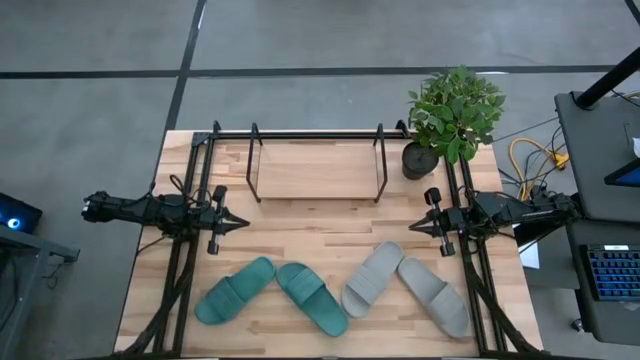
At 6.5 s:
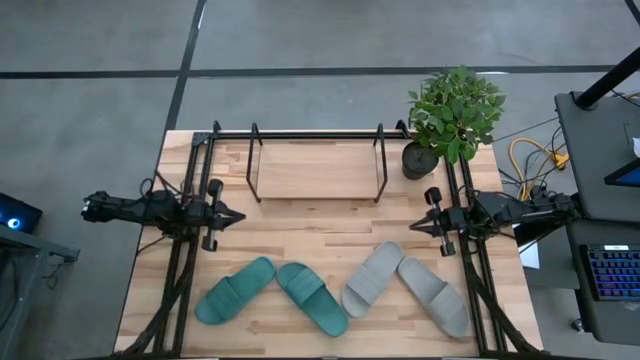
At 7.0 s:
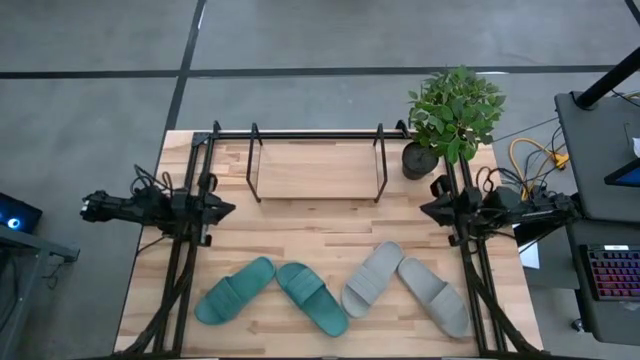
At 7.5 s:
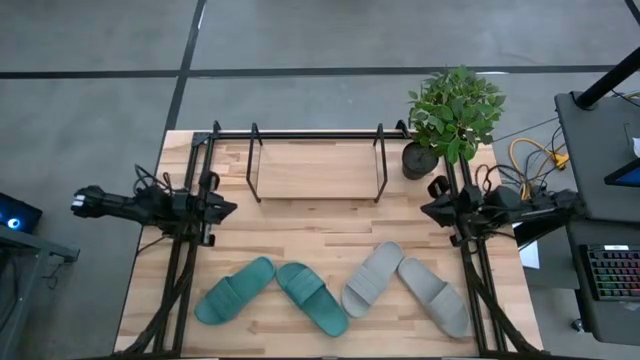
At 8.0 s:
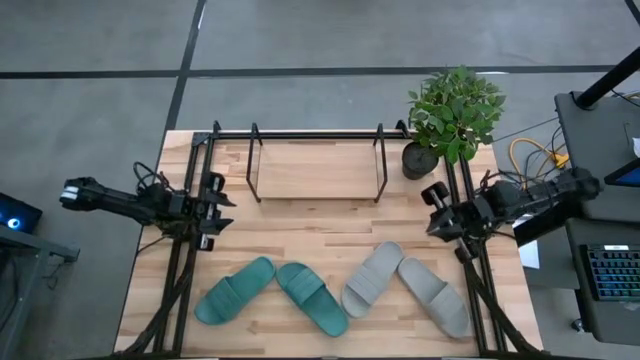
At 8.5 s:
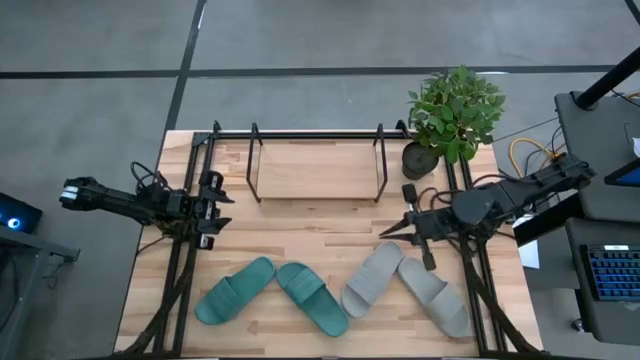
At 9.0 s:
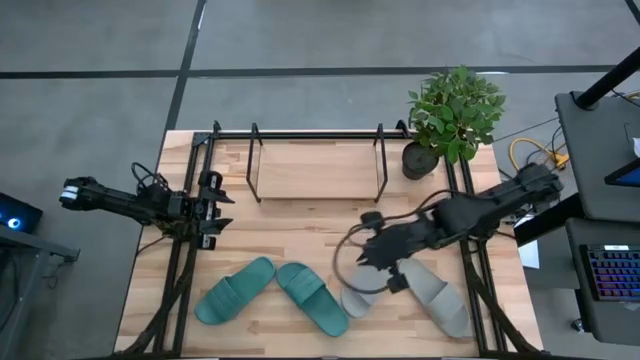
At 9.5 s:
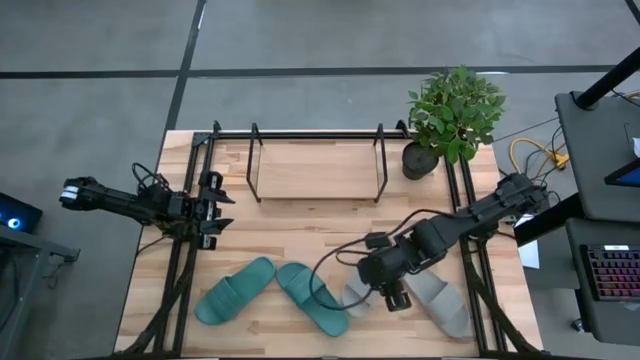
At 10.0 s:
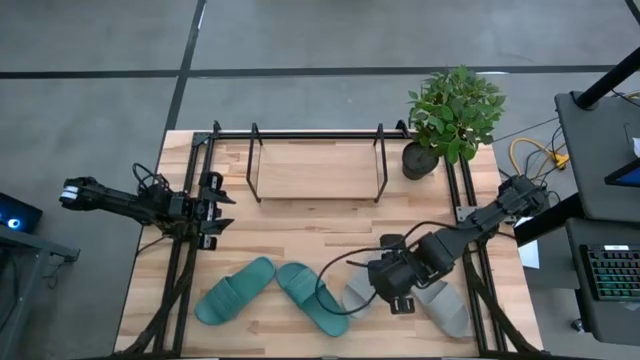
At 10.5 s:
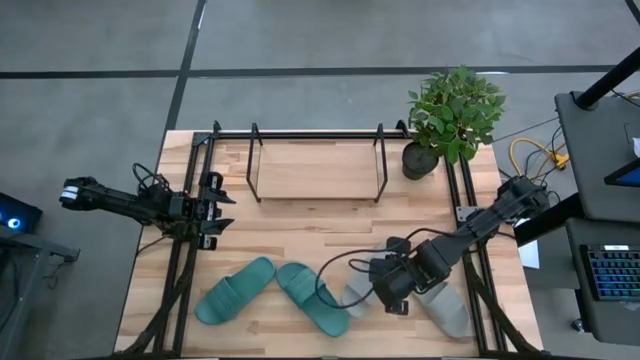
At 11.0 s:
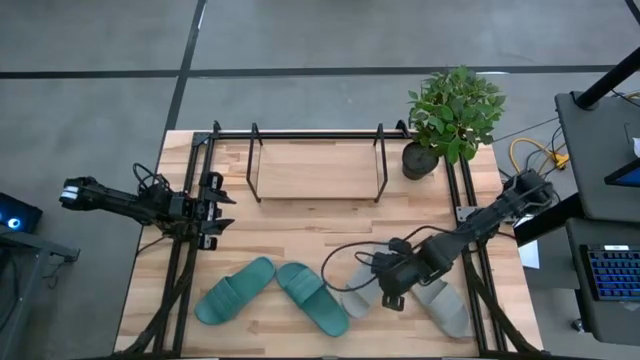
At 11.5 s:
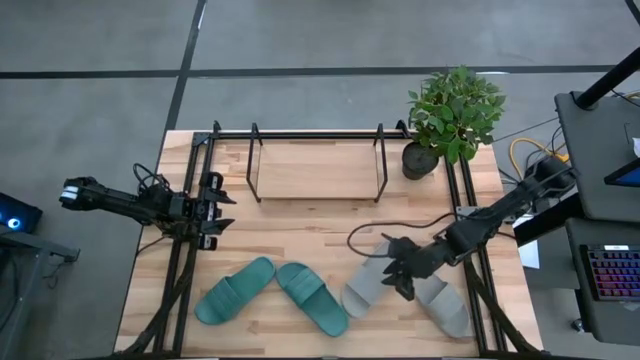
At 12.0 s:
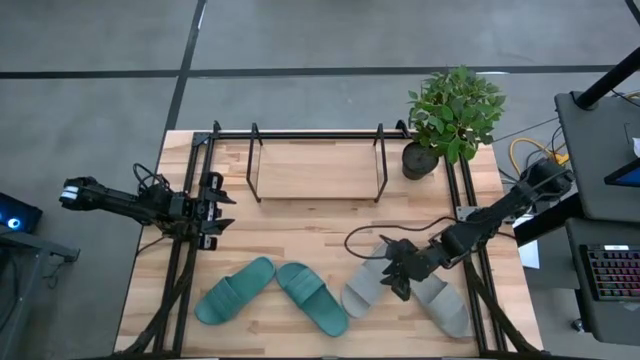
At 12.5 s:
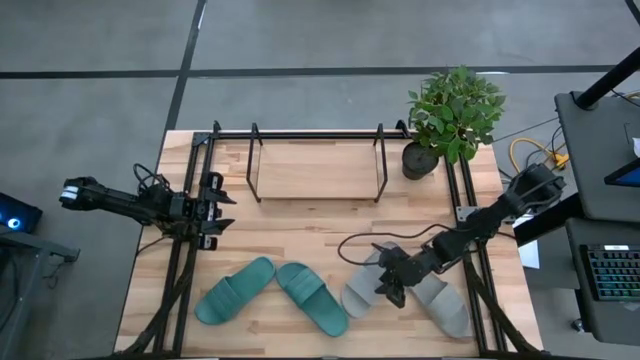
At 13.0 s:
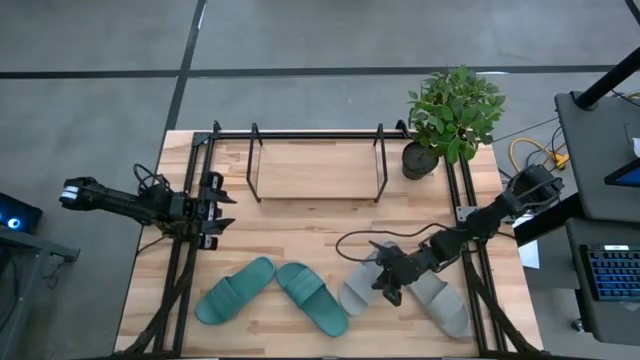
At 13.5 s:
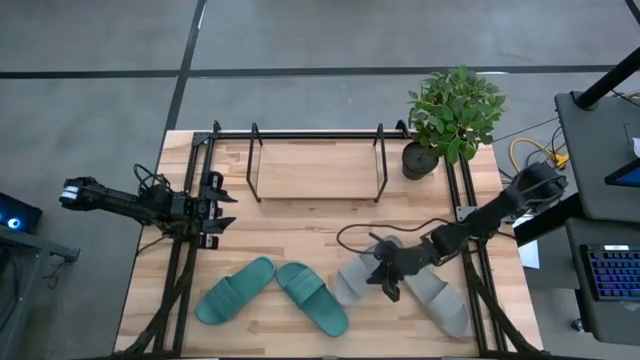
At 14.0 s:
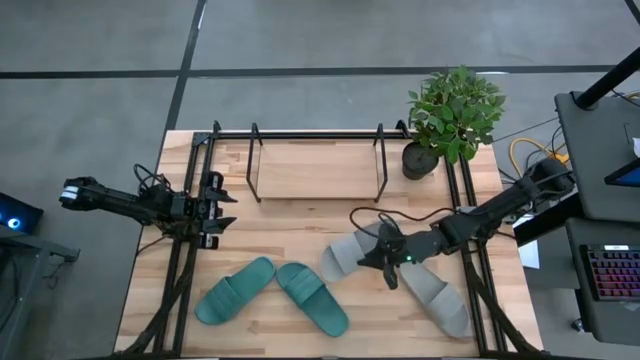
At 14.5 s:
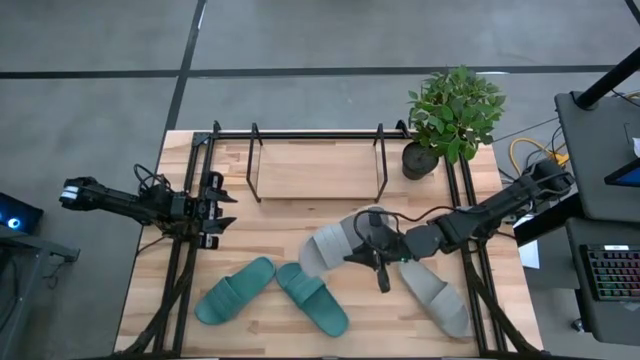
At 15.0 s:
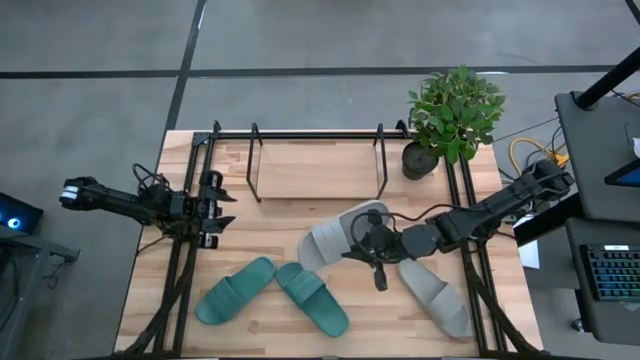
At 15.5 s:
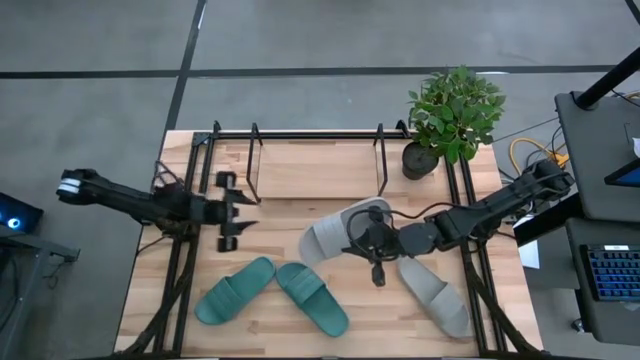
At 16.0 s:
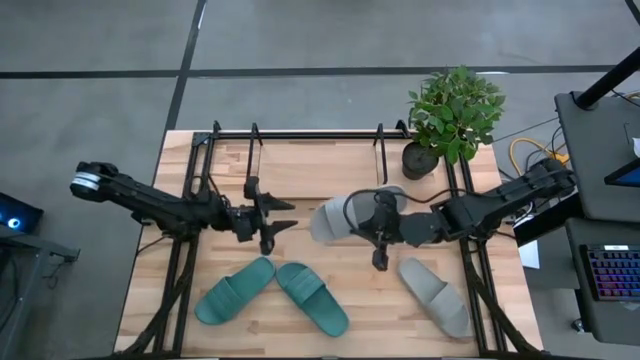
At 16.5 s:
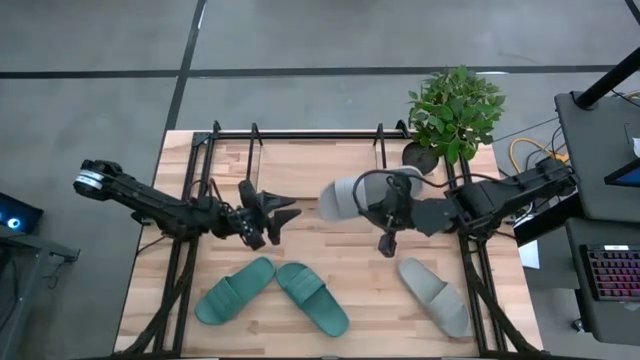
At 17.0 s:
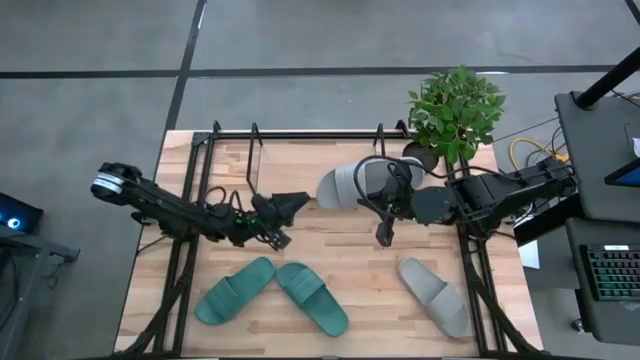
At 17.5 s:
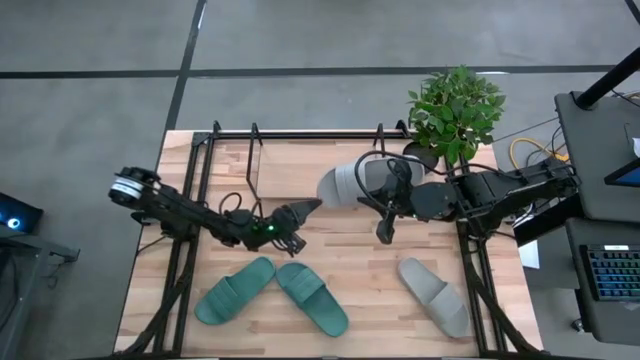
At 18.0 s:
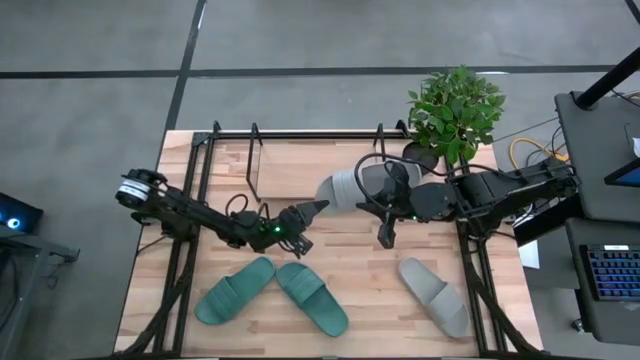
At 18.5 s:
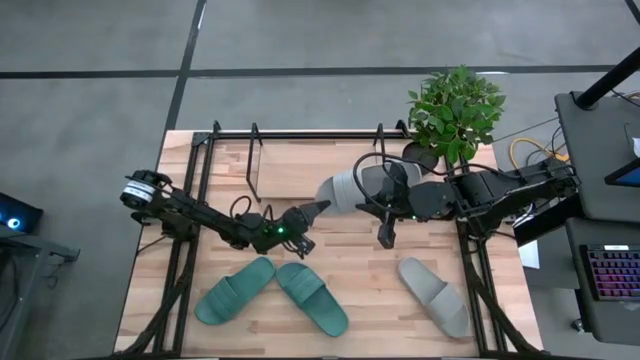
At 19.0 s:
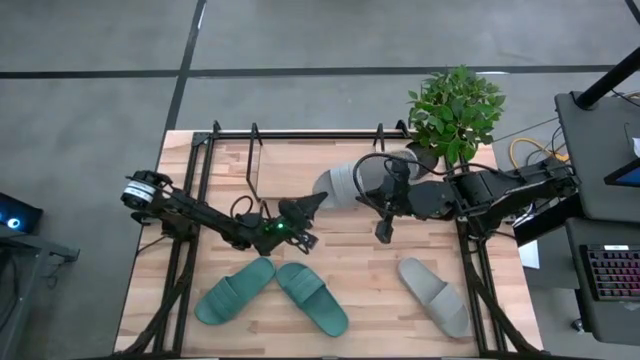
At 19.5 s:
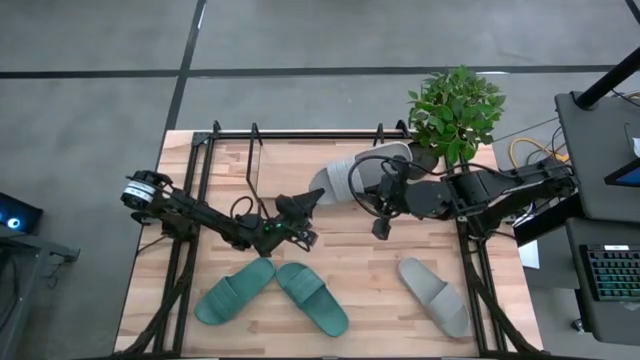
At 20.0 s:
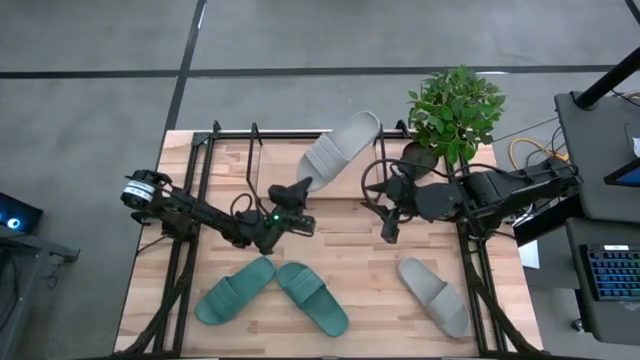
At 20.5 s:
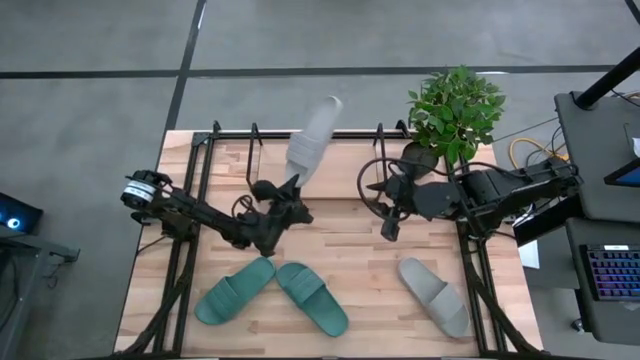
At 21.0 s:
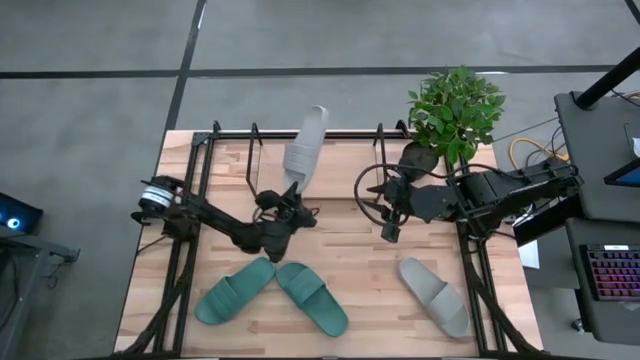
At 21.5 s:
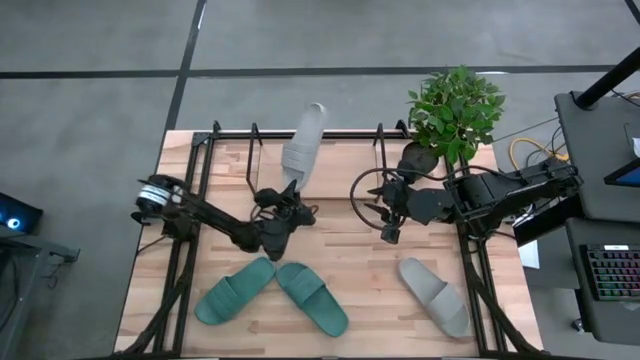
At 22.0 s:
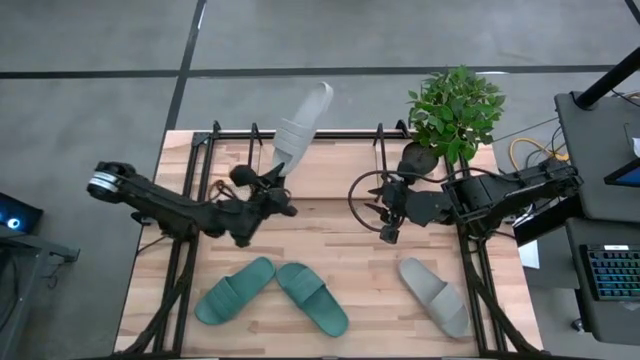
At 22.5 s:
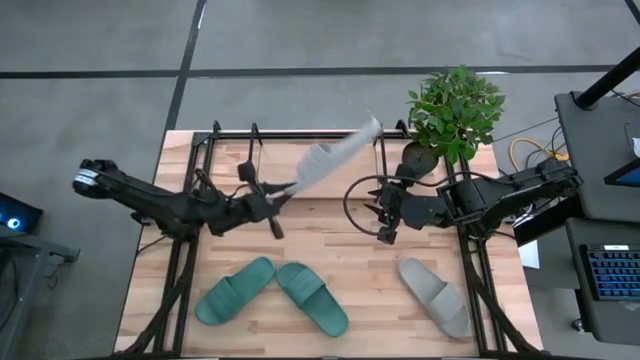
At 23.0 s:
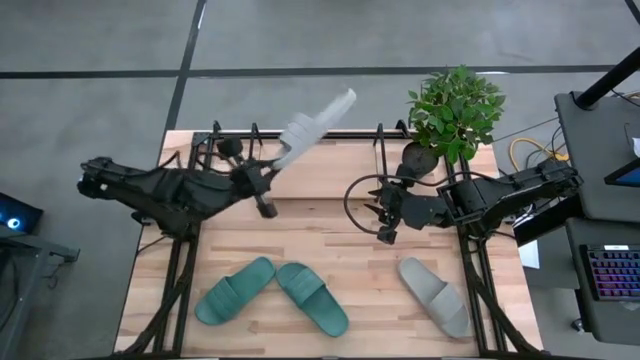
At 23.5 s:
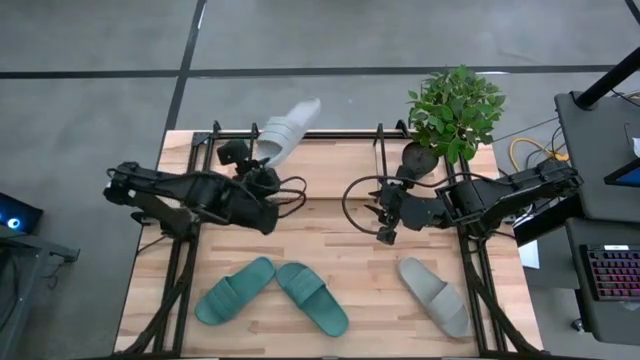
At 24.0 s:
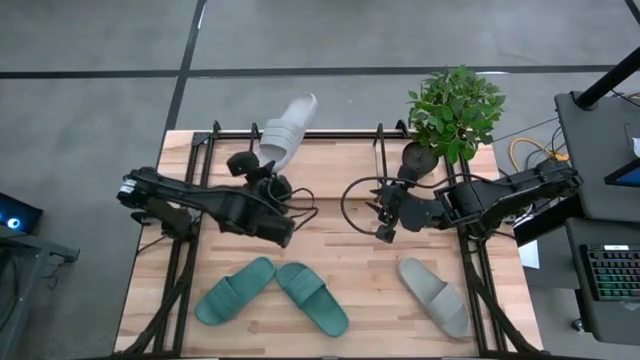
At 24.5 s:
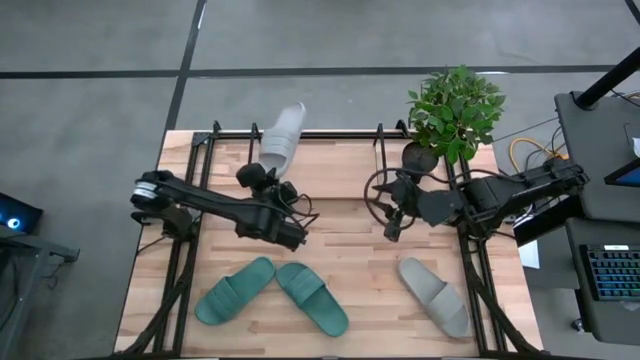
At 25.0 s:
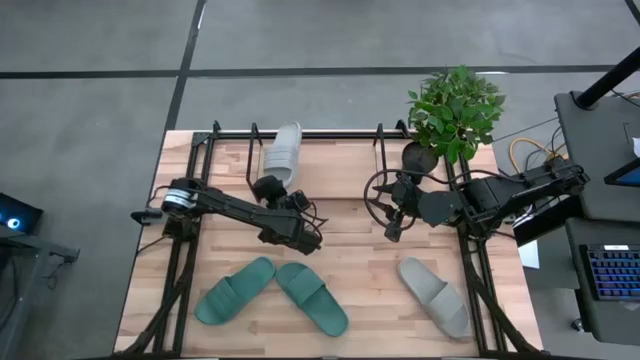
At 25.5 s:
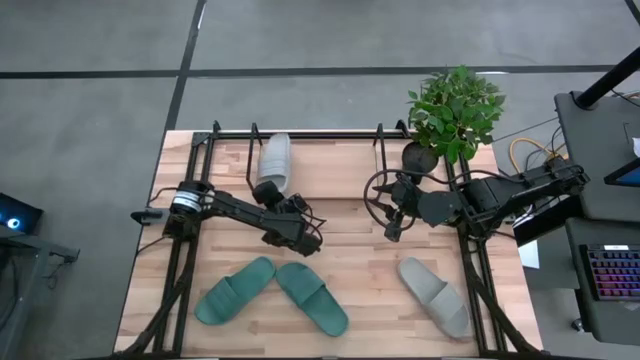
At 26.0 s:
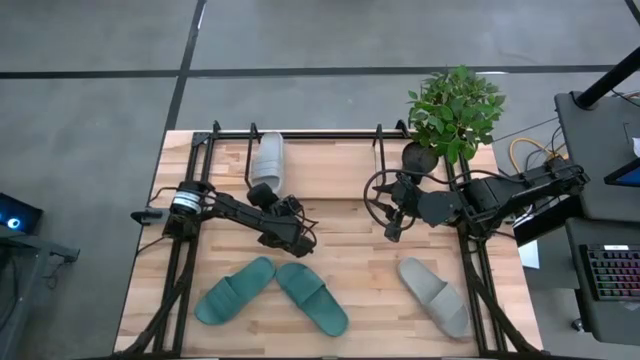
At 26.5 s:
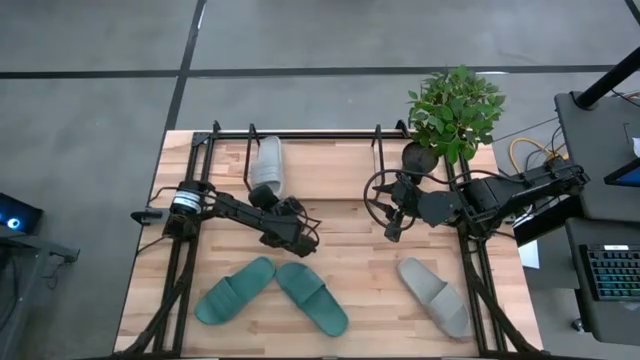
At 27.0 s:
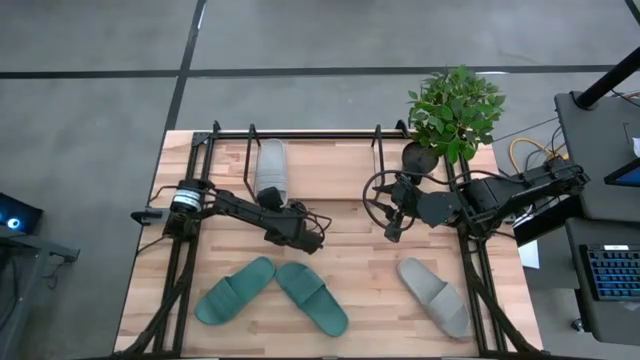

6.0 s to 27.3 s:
Task: Pick and place slides into the shelf
Put the left gray slide on the shelf
